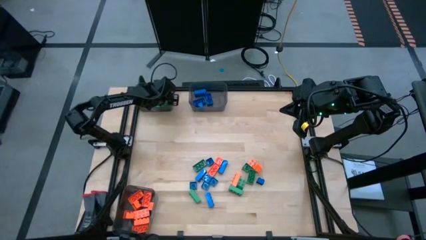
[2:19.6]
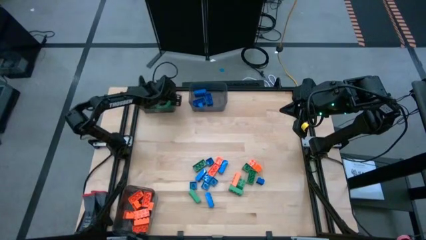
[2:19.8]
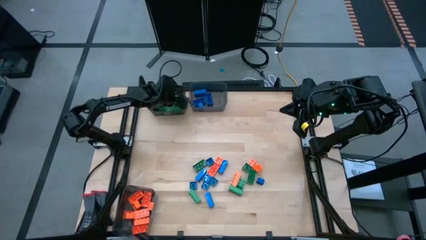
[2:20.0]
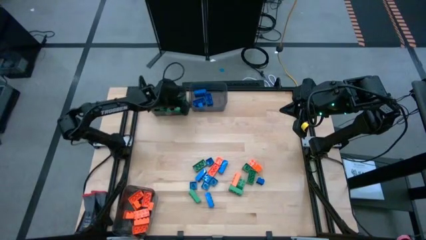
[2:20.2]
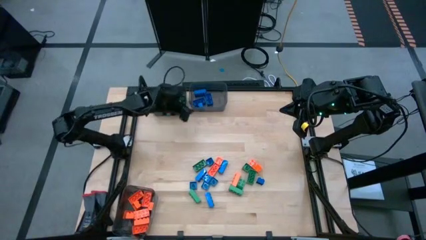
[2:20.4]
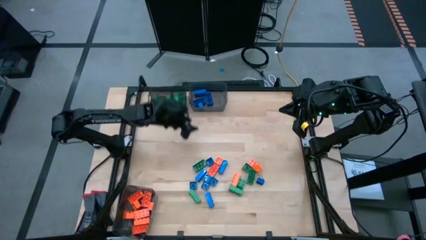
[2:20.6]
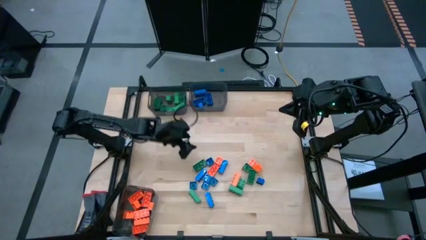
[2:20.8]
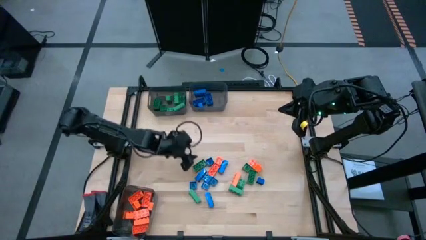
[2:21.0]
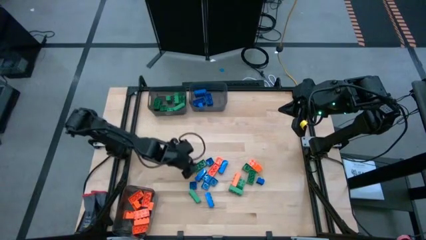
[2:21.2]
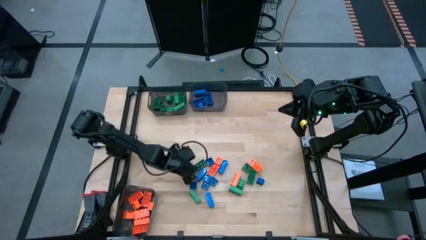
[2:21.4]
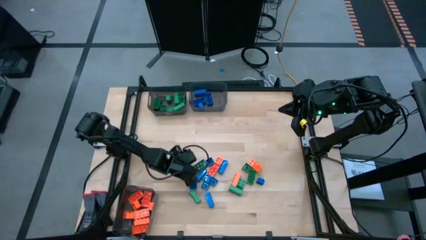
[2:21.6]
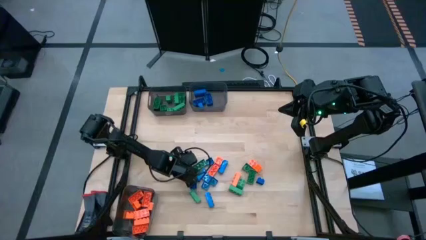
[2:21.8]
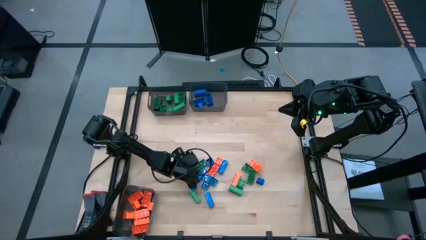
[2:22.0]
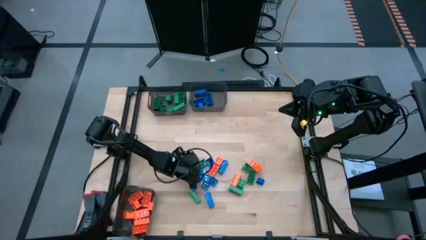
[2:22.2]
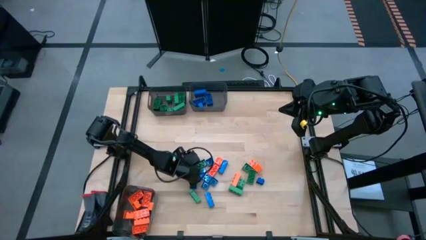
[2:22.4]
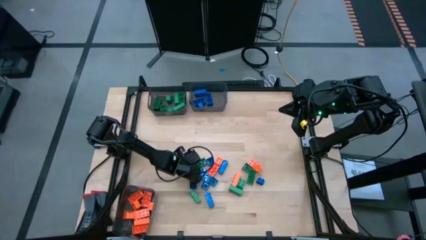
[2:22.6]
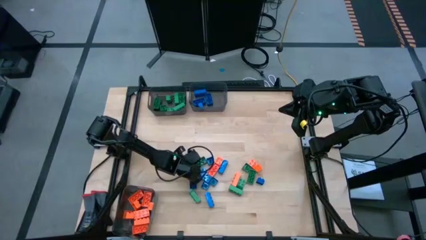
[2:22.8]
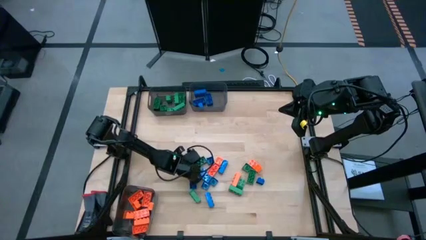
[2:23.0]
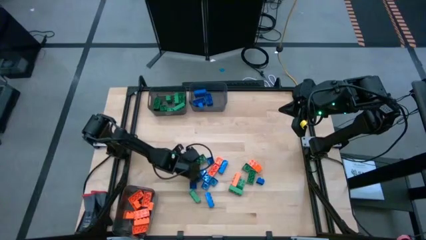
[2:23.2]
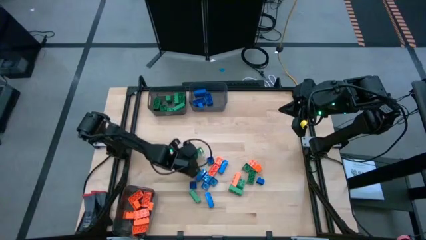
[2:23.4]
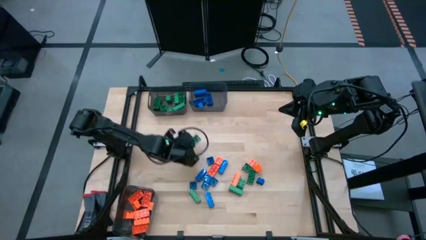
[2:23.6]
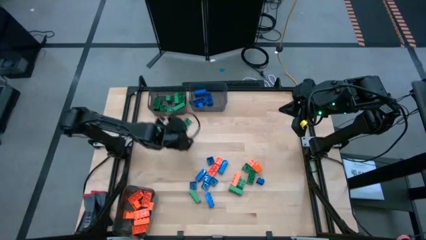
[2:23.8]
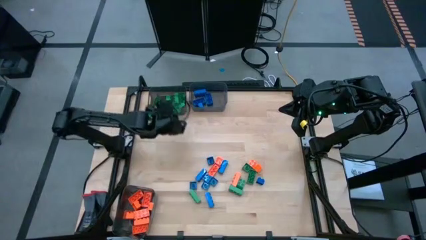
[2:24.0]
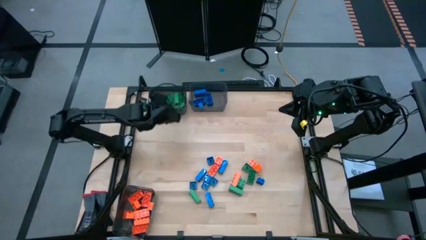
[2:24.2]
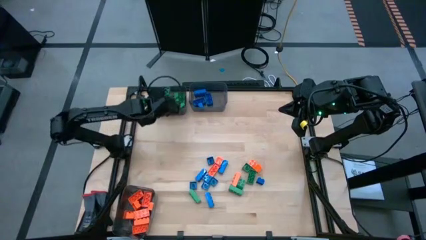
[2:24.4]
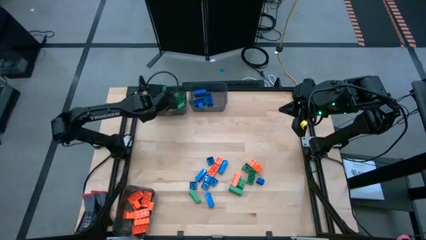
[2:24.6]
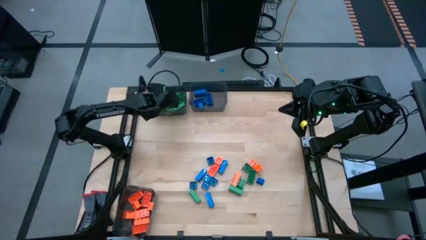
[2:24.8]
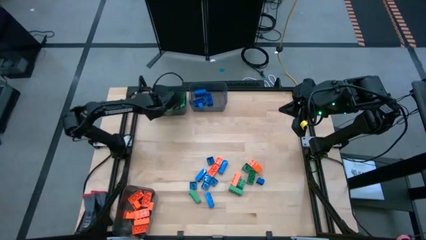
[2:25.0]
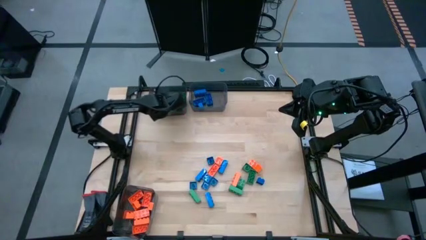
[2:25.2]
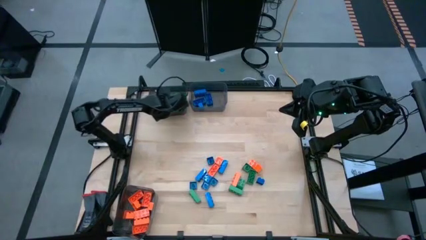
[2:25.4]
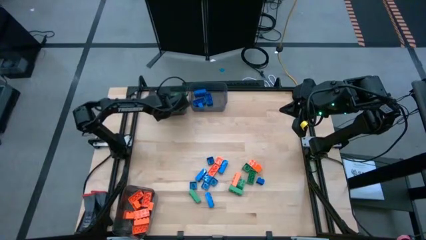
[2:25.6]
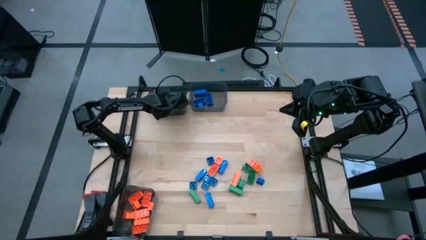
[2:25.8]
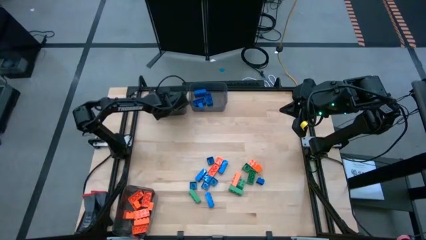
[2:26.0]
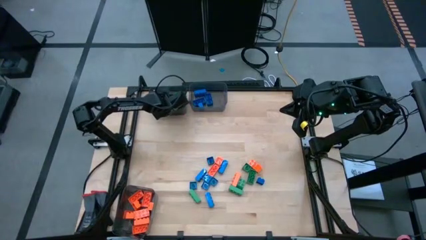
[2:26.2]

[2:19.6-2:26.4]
Task: Sort blocks
Put the green gamepiece into the top left black bin

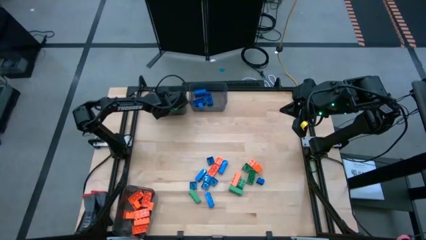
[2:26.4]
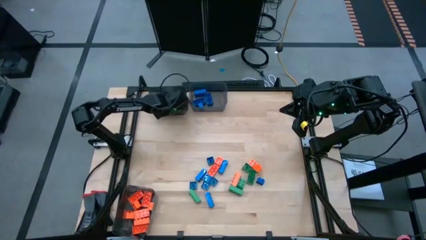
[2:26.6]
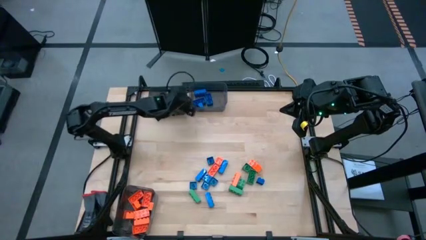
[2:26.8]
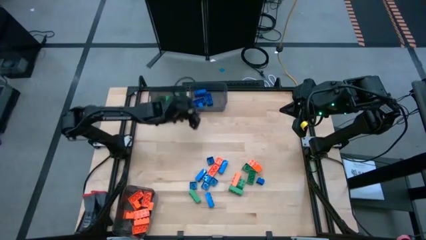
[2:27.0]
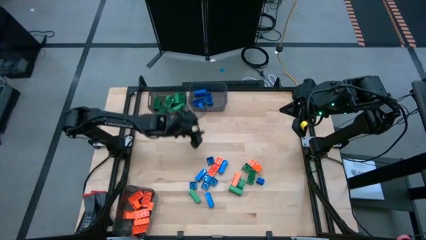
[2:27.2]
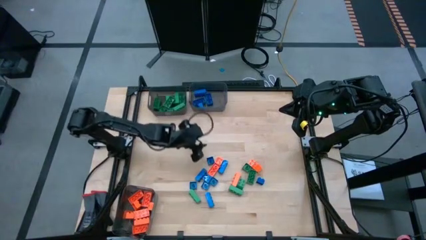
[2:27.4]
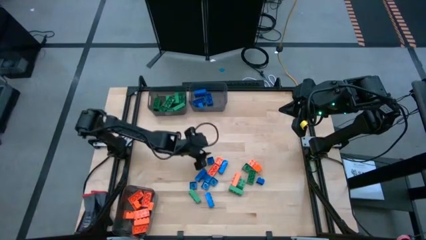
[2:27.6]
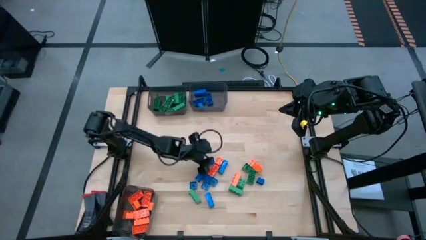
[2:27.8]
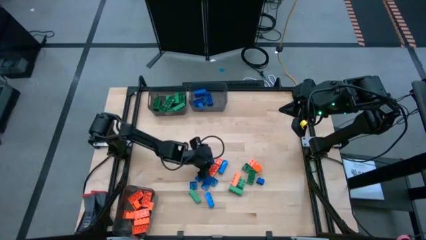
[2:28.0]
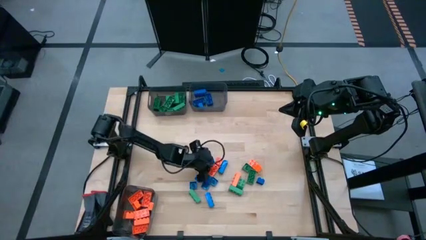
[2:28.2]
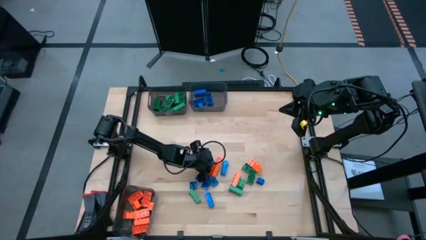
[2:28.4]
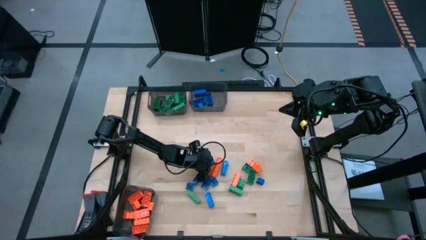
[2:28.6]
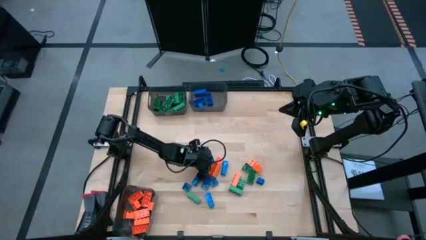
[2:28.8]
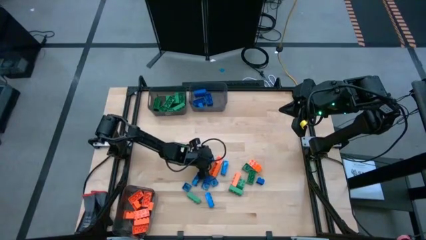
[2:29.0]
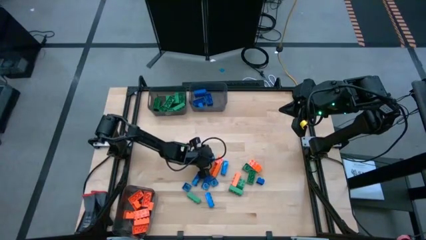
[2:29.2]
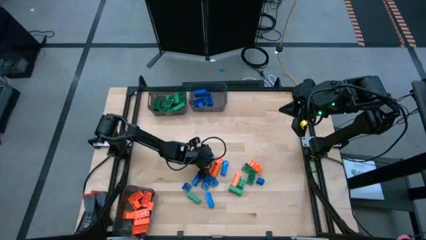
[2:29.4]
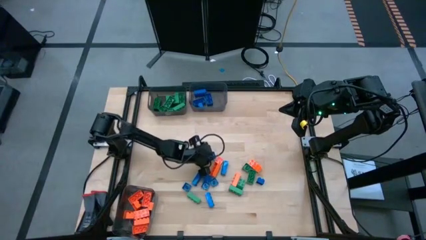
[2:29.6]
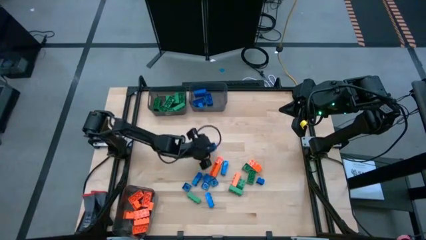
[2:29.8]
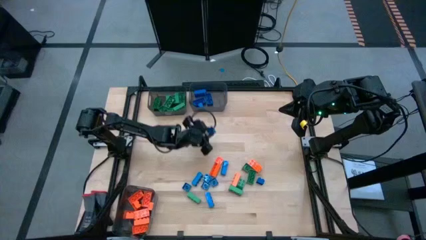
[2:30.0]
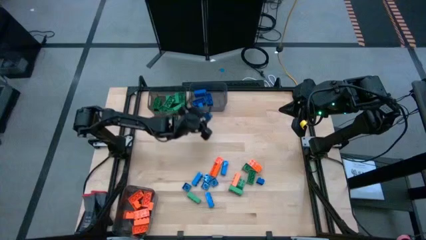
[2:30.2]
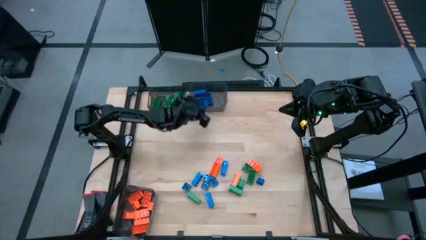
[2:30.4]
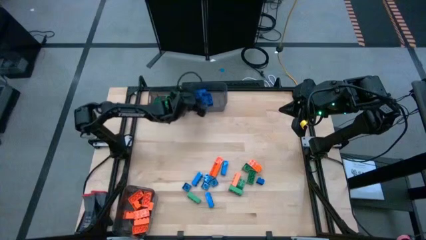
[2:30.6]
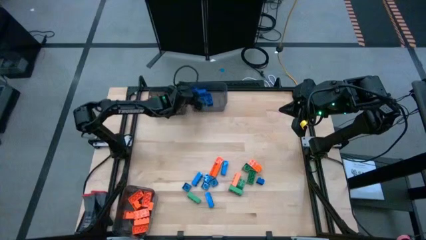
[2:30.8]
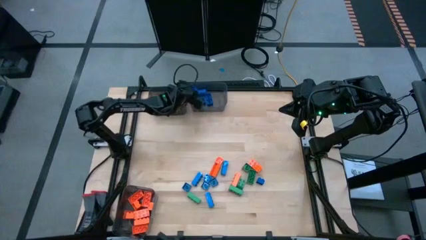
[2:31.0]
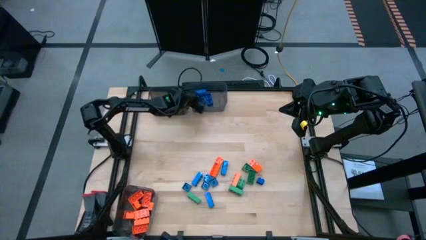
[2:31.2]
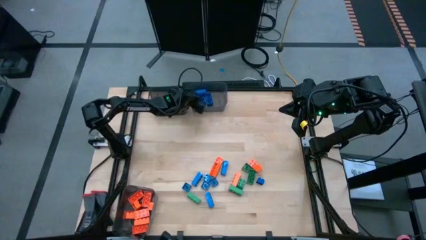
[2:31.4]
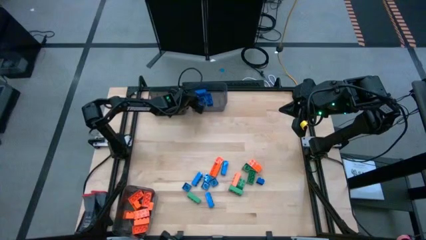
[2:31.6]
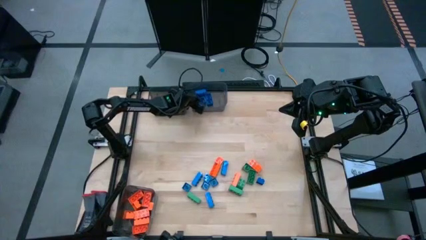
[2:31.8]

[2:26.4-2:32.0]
Put the blue gamepiece into the top right black bin

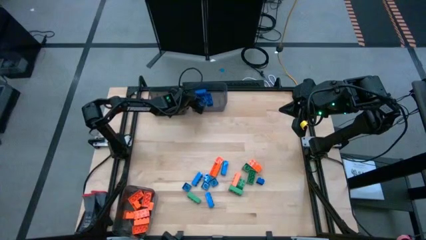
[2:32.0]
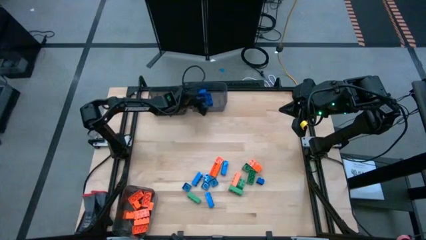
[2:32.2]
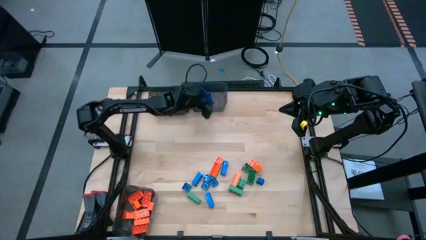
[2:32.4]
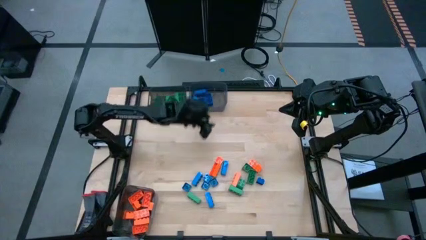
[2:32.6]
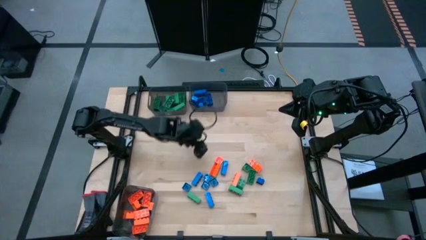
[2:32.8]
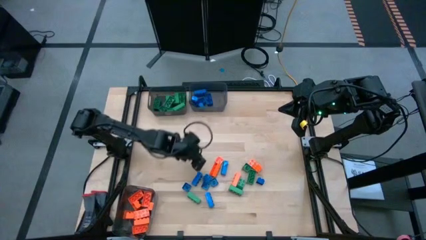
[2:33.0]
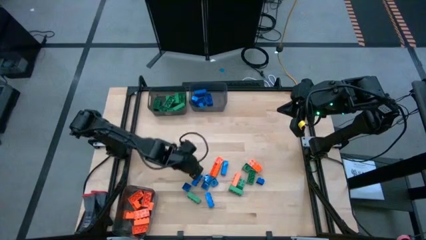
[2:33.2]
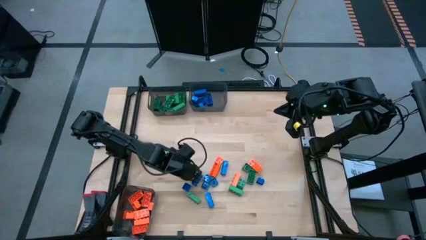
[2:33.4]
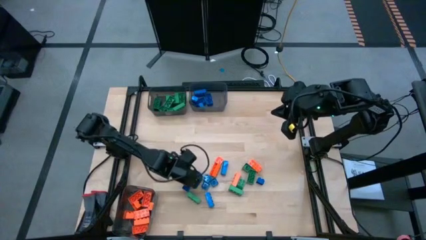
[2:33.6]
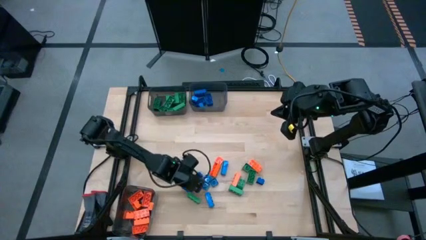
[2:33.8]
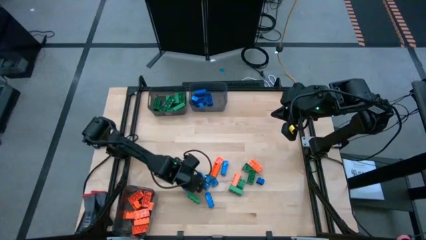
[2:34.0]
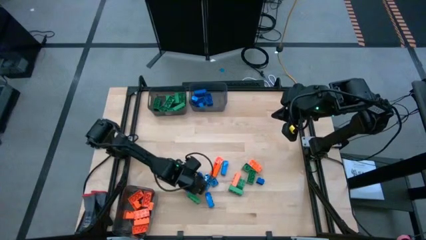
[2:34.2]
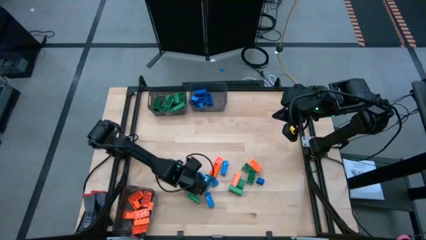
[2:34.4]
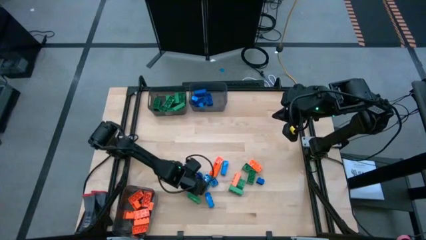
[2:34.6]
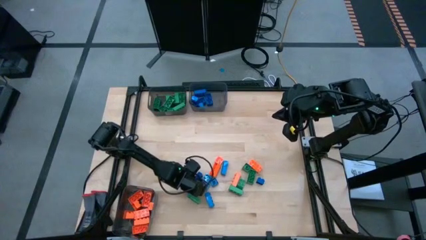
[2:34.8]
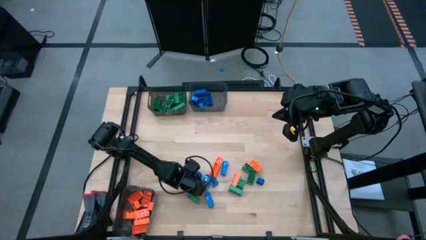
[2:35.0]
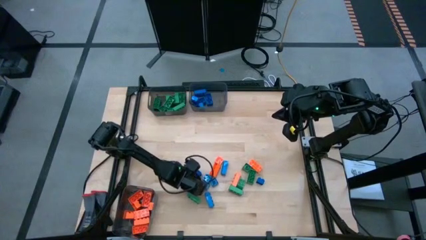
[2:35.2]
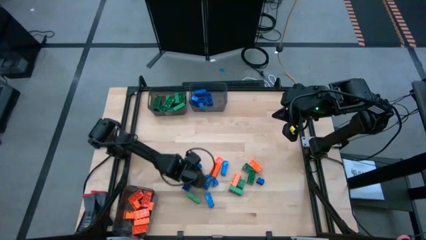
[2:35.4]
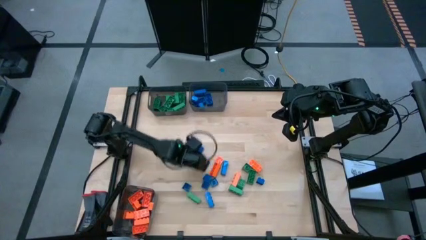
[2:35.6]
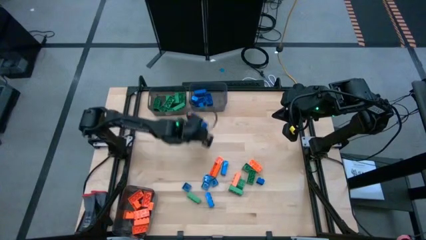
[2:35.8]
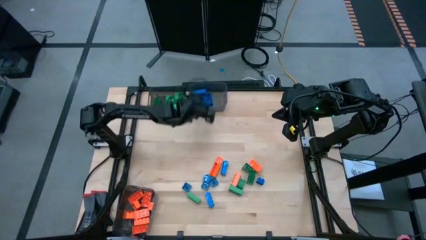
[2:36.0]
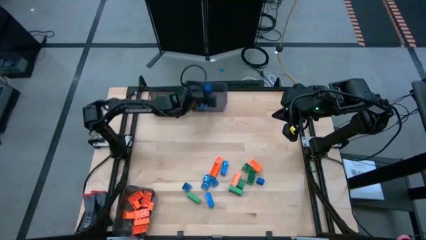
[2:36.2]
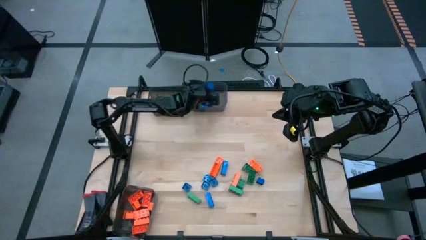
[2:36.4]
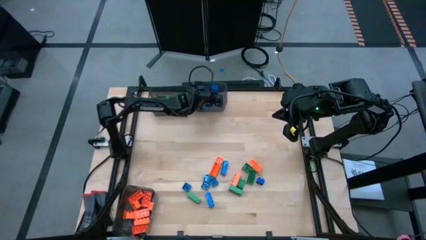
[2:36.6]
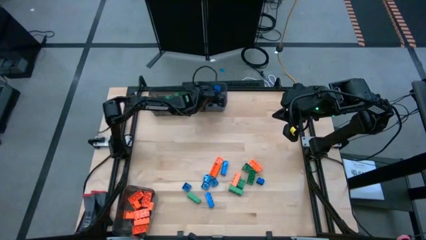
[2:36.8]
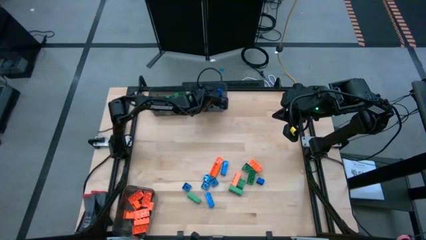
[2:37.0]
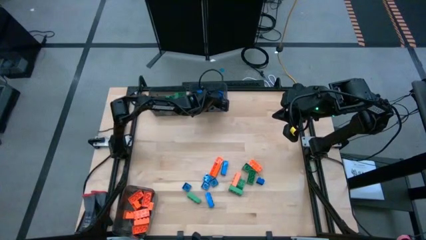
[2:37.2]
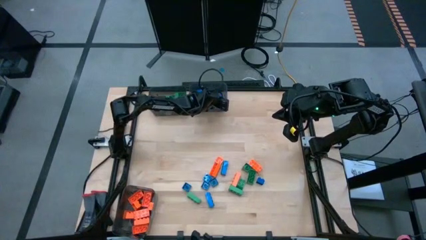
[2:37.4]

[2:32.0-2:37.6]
Put the blue gamepiece into the top right black bin
